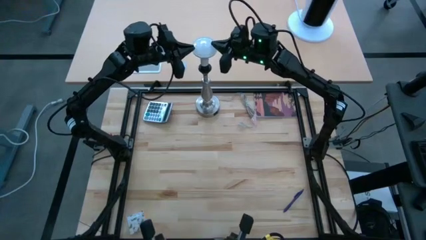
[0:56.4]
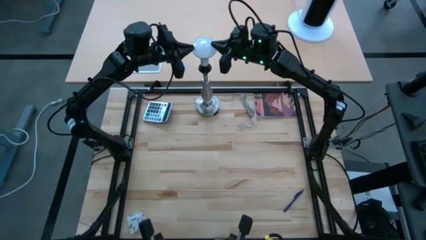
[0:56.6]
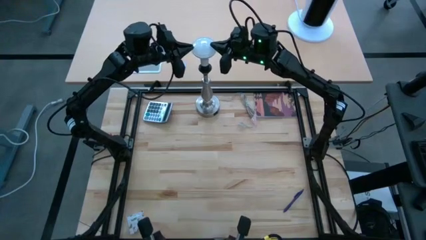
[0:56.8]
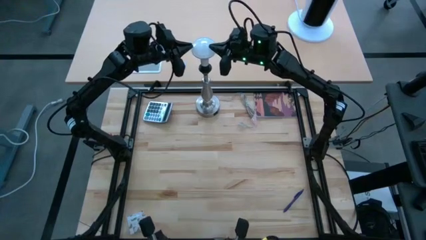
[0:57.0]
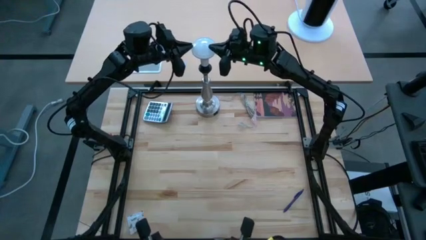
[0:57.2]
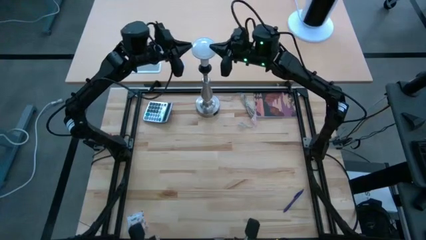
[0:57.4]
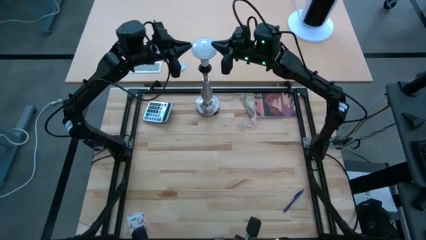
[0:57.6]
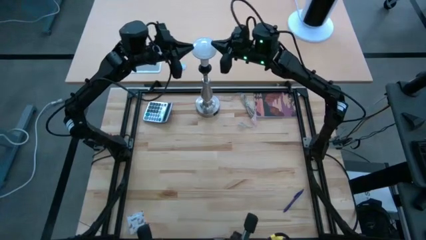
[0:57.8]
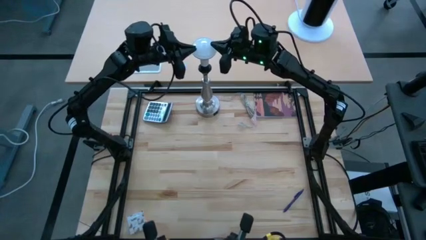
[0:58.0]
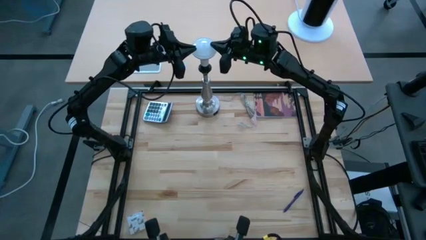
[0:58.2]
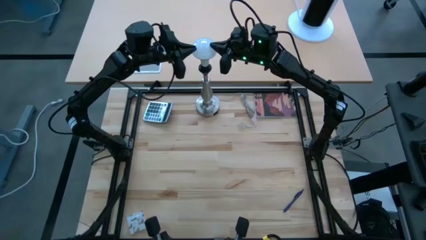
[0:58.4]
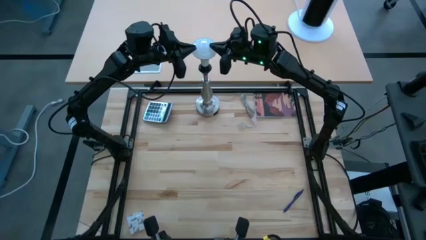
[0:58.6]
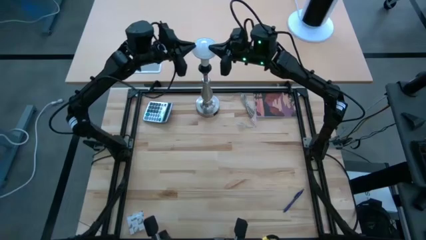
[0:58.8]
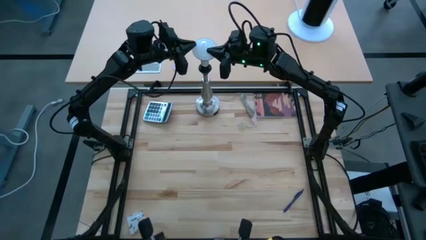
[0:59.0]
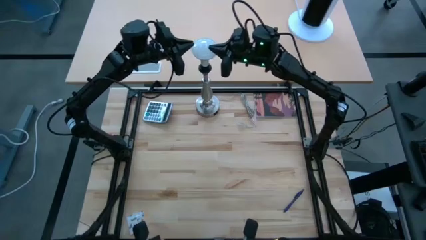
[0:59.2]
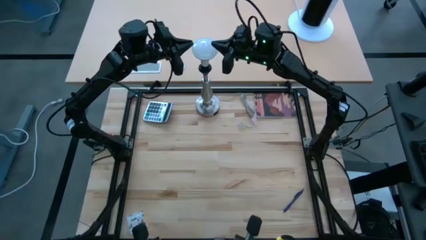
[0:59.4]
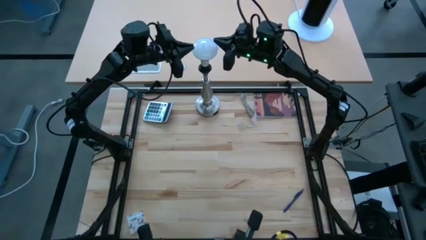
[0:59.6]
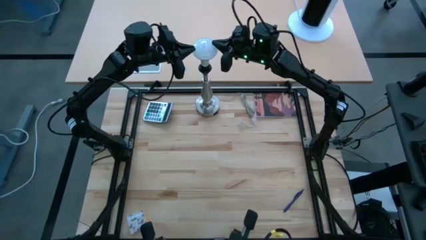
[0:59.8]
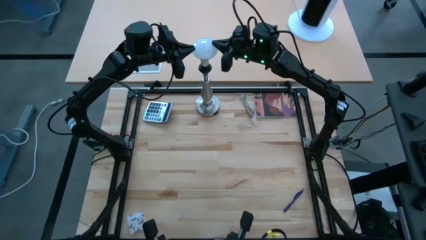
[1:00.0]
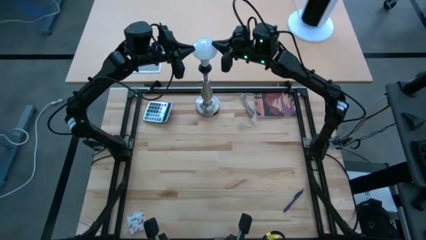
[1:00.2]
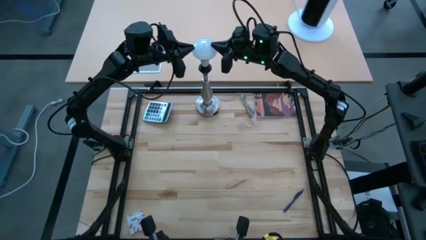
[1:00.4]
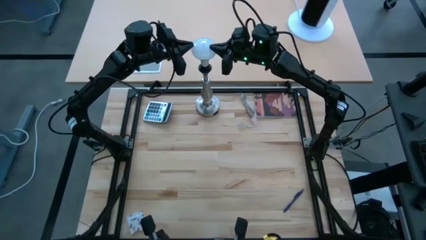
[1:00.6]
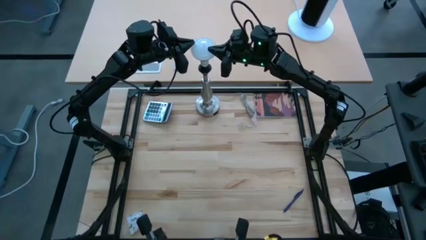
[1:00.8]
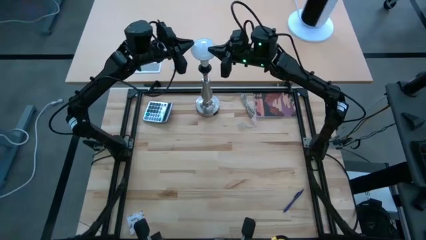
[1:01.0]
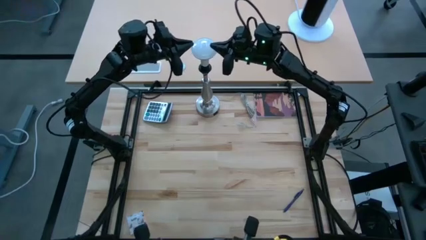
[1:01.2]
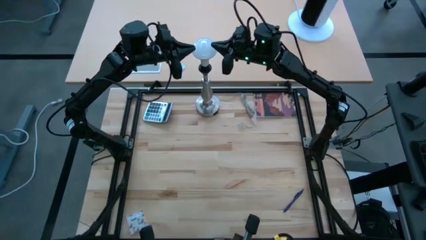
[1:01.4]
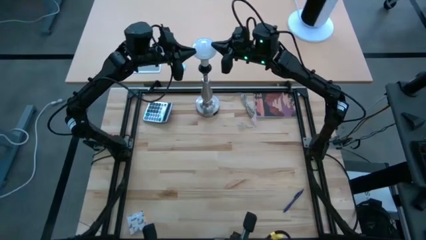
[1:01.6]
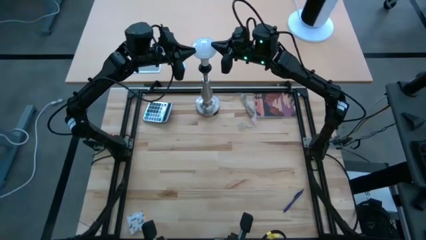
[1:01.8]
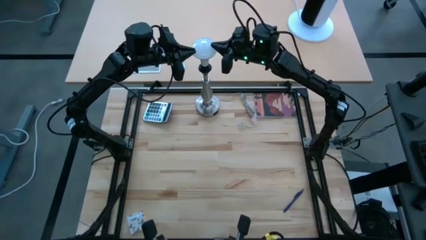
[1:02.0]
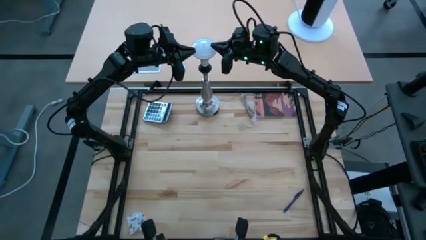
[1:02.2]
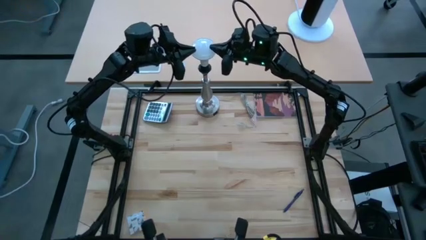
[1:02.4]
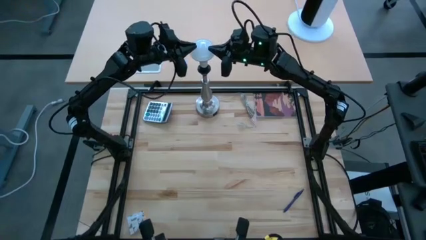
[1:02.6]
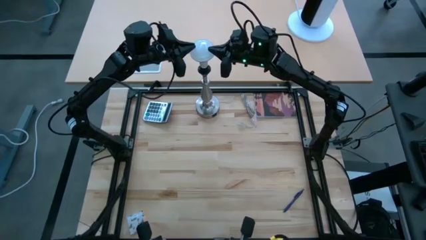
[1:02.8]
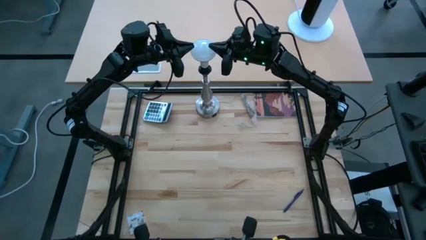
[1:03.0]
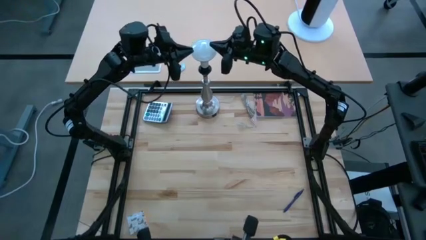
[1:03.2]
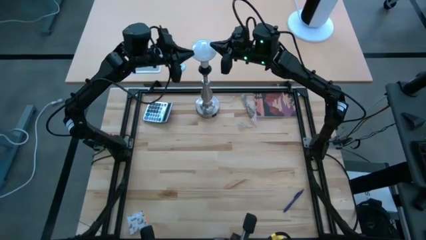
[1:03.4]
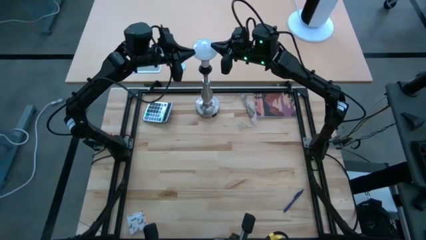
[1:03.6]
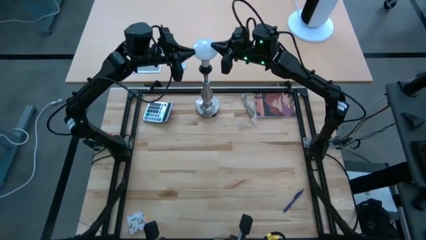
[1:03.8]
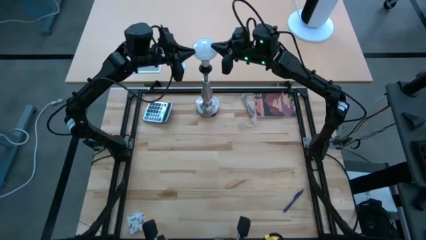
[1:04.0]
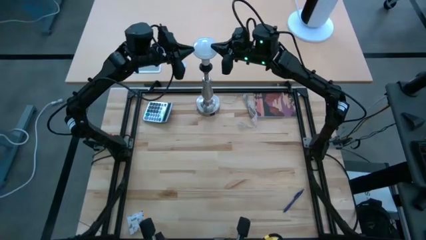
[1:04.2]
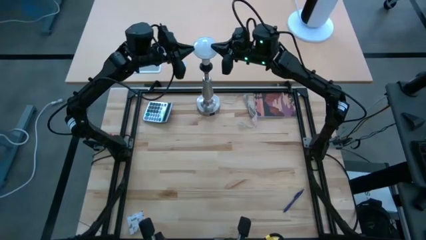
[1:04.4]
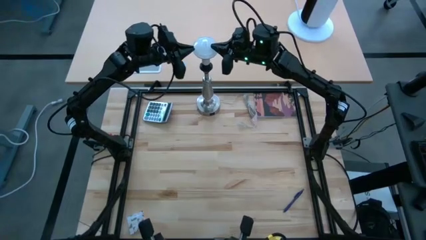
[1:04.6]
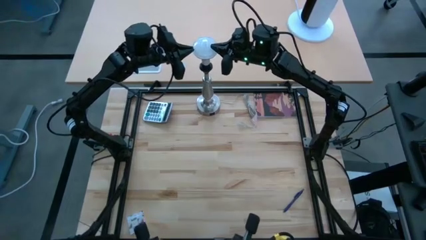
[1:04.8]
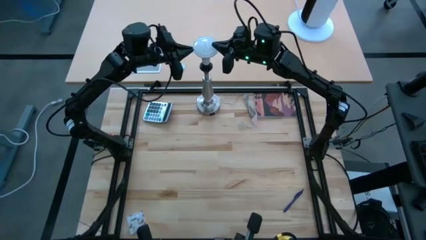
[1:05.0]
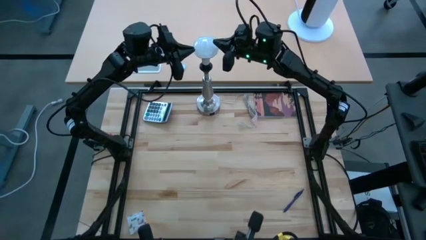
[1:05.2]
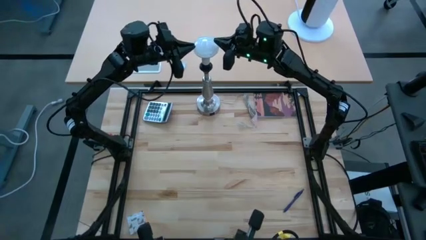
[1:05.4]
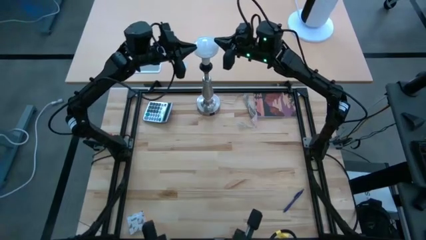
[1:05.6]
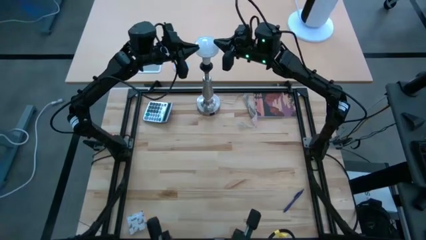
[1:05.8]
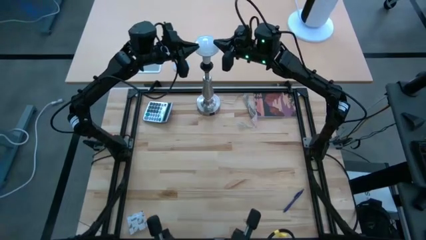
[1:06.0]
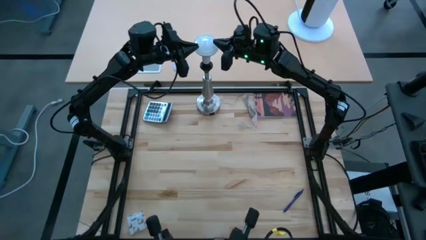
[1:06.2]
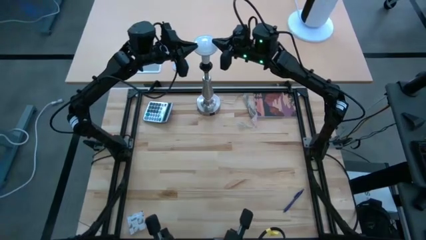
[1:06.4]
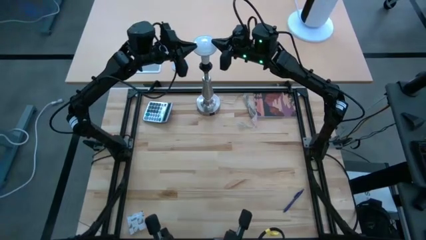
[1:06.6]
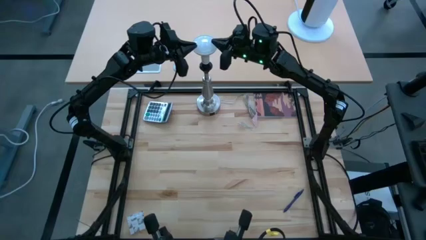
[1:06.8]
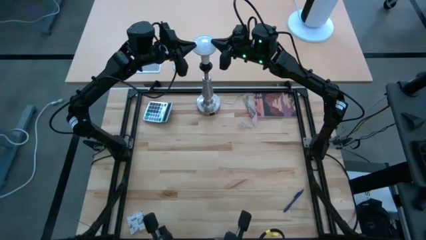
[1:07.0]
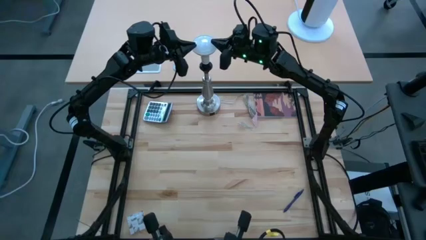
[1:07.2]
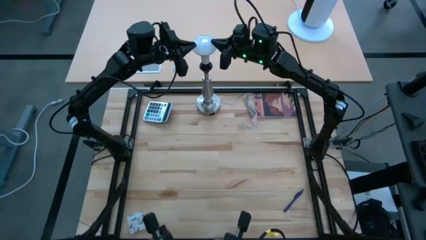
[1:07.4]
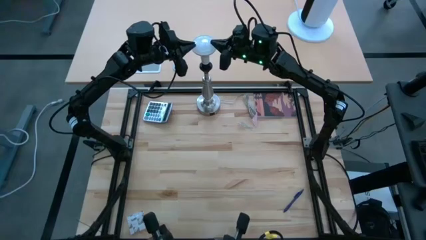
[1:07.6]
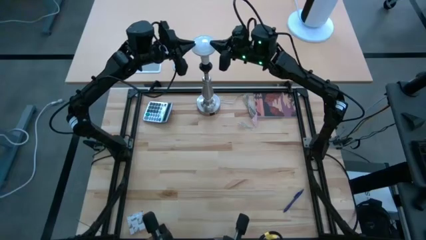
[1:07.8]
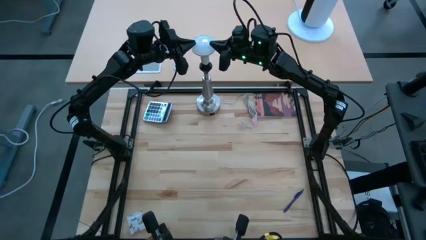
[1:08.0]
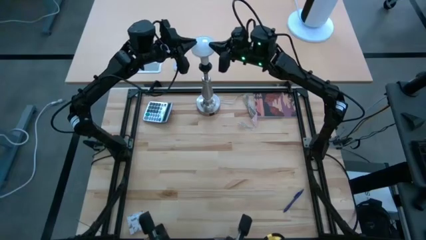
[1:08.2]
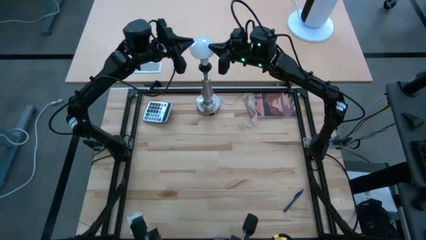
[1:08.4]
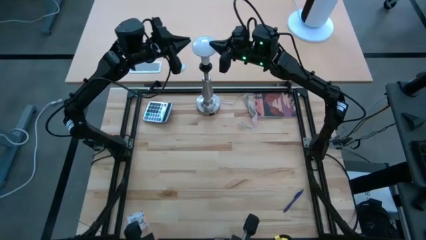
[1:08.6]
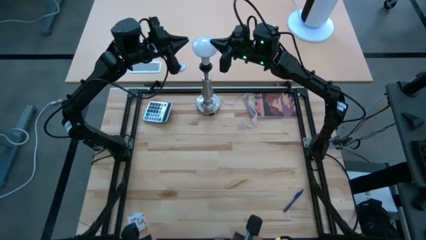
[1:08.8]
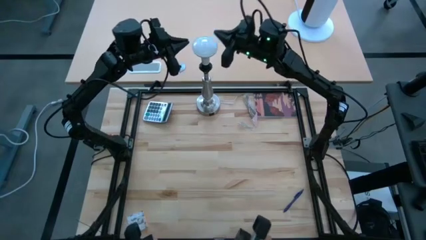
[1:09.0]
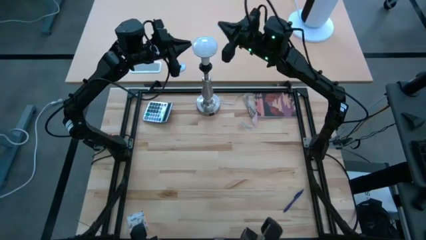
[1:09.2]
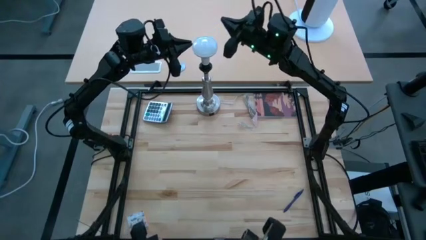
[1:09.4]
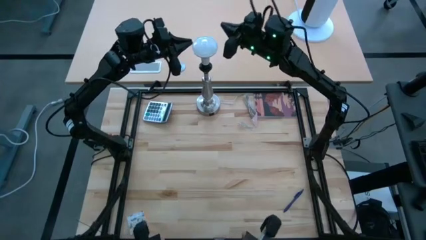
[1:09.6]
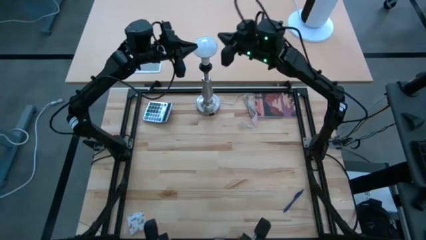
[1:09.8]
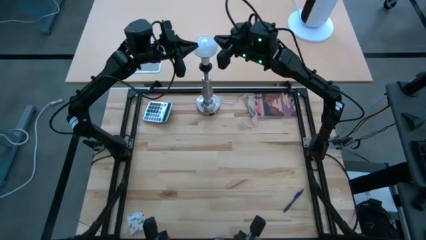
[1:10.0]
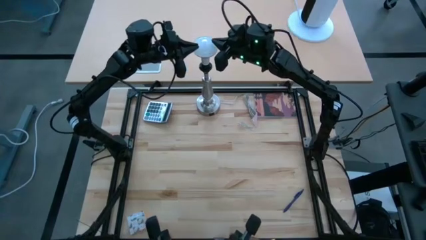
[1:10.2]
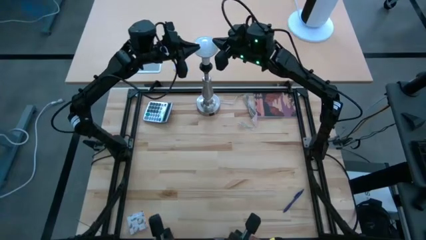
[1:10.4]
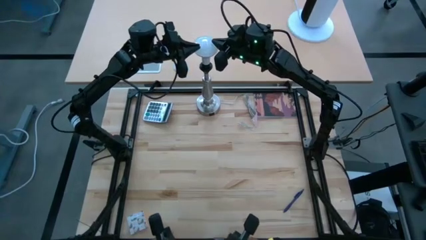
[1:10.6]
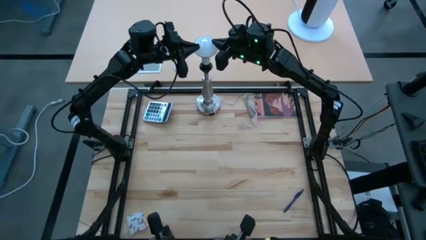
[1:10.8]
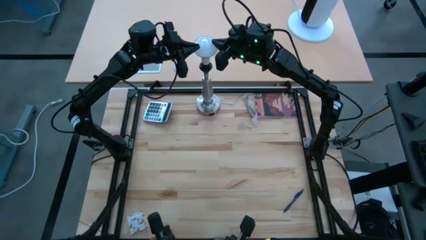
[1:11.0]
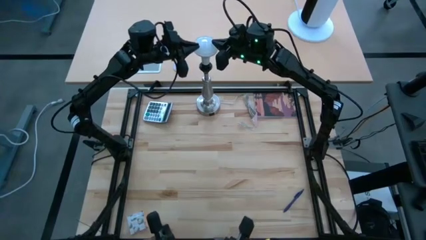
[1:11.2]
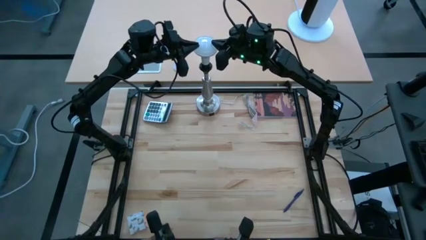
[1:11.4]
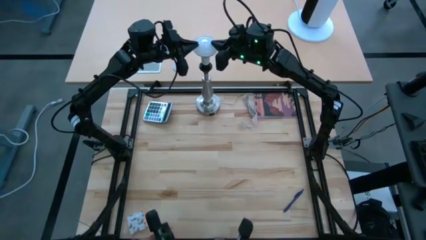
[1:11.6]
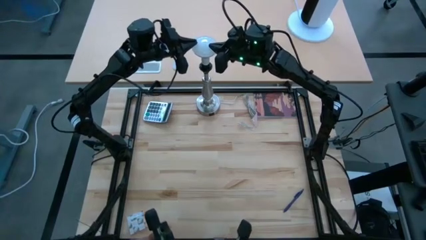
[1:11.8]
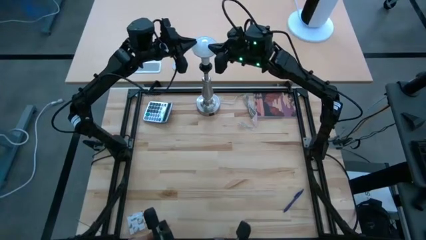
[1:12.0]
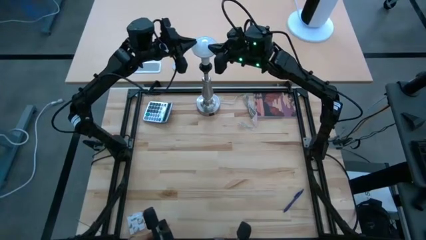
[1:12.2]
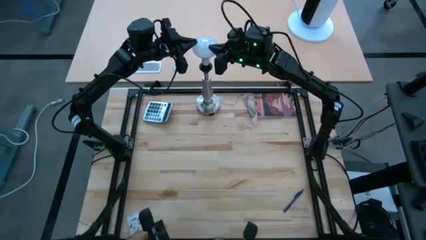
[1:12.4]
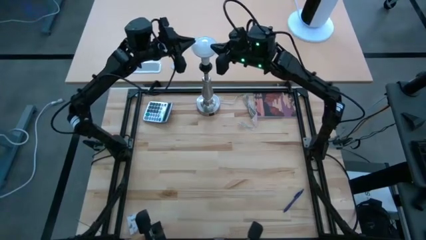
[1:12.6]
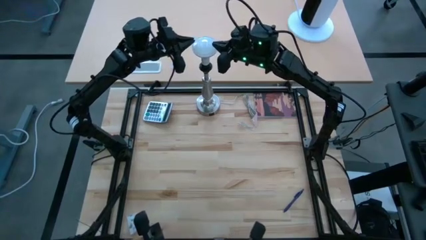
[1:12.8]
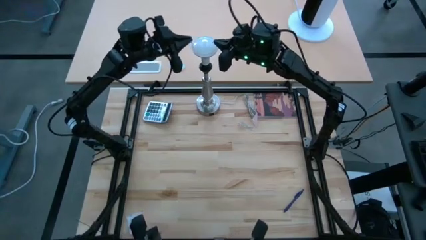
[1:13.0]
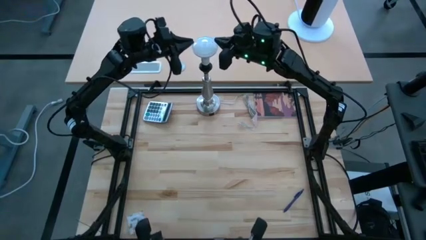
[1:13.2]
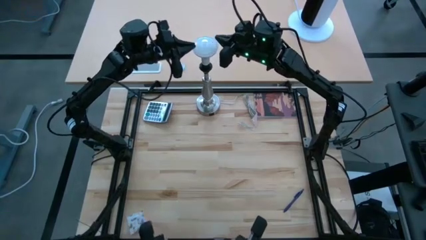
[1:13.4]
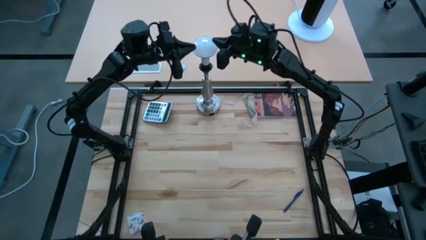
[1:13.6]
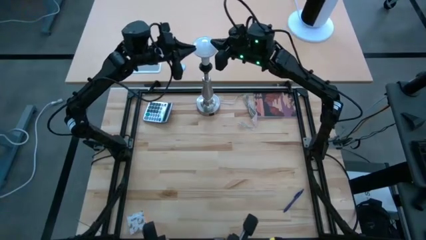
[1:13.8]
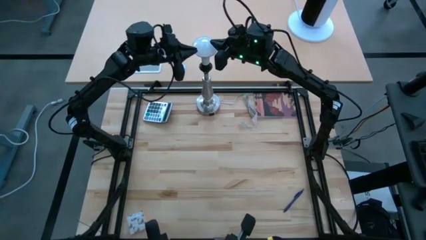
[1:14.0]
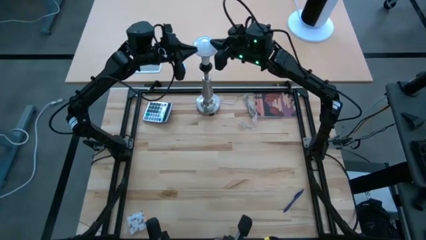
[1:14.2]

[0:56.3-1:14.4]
Task: Screw lightbulb
Insert the lightbulb into the table lamp
